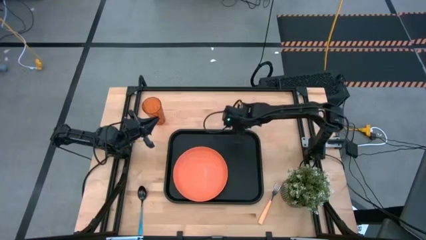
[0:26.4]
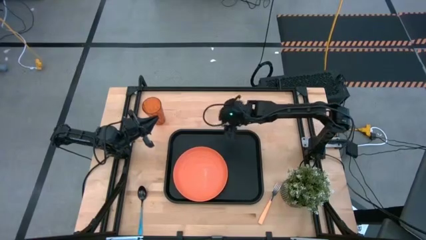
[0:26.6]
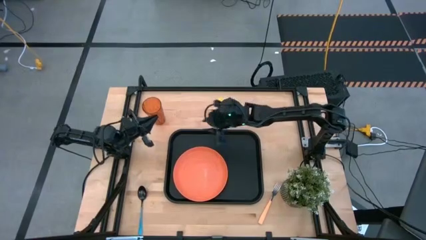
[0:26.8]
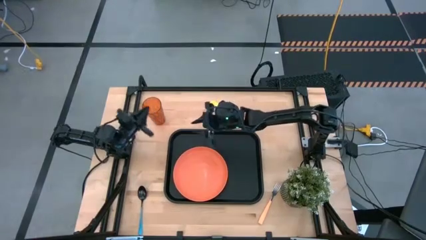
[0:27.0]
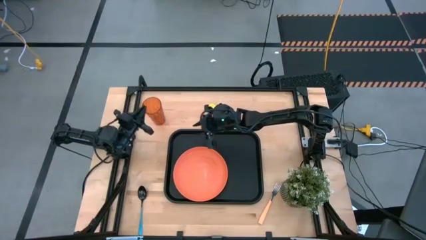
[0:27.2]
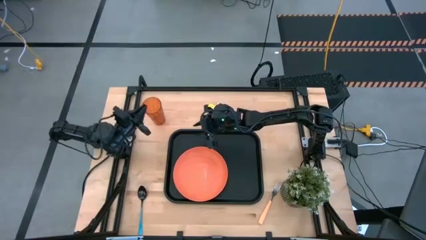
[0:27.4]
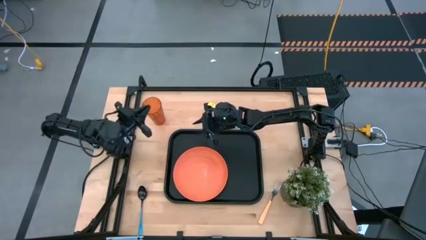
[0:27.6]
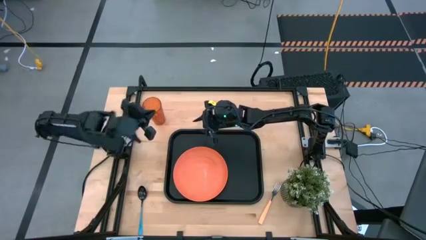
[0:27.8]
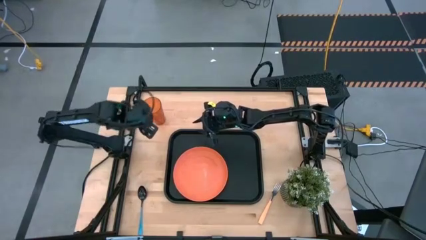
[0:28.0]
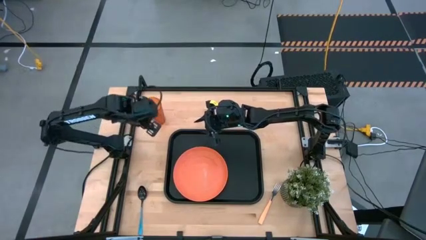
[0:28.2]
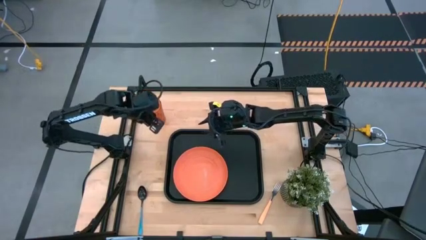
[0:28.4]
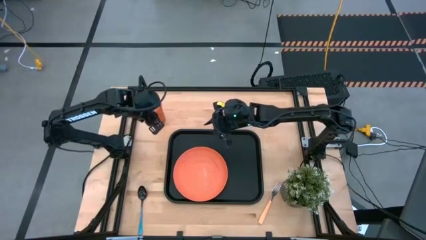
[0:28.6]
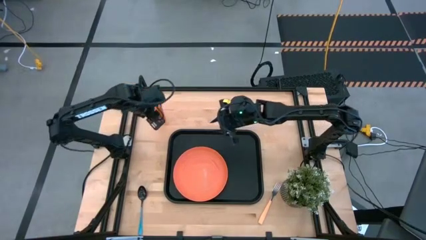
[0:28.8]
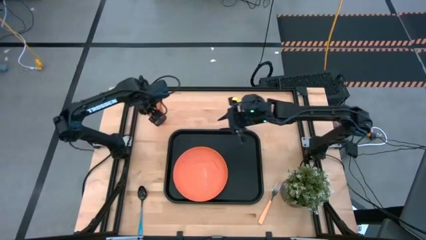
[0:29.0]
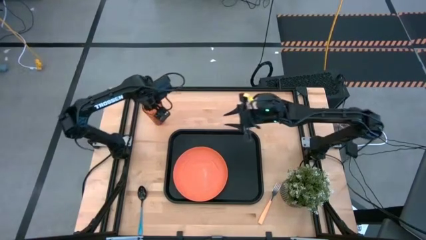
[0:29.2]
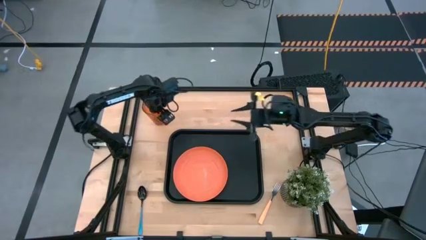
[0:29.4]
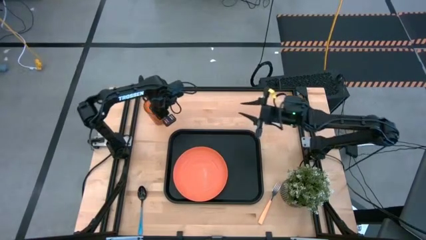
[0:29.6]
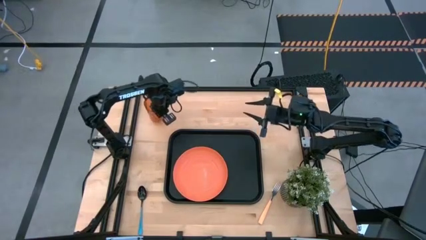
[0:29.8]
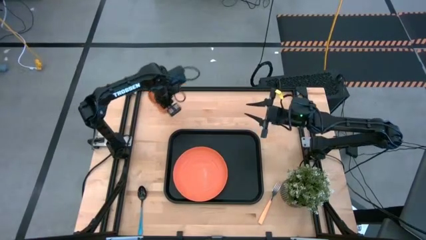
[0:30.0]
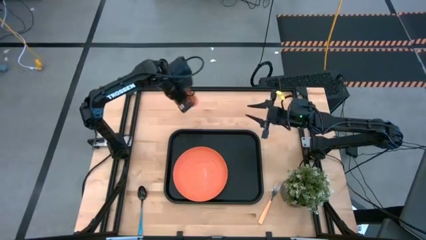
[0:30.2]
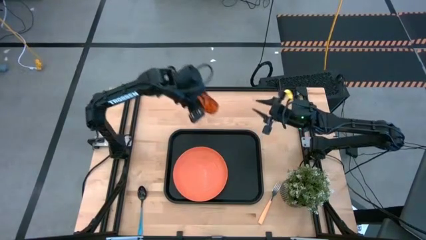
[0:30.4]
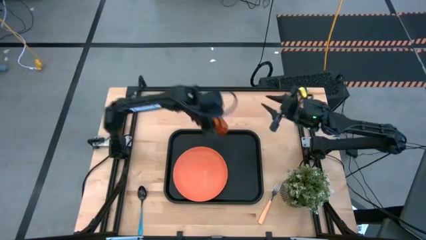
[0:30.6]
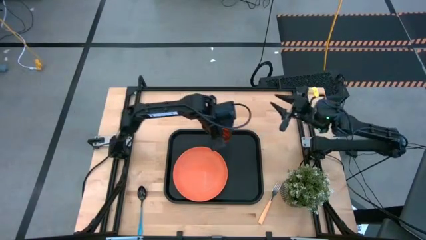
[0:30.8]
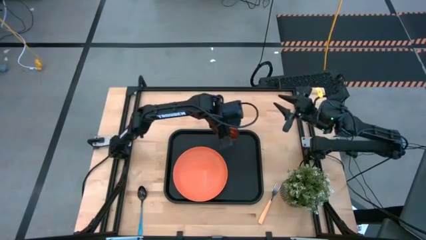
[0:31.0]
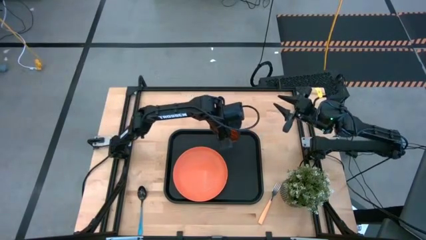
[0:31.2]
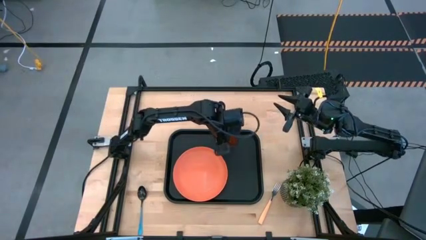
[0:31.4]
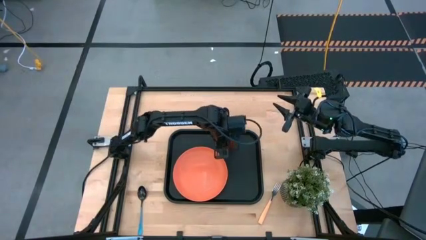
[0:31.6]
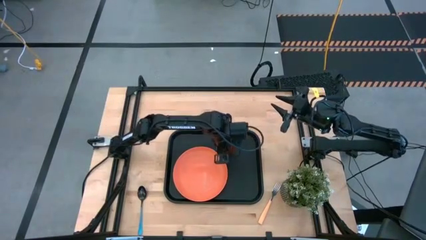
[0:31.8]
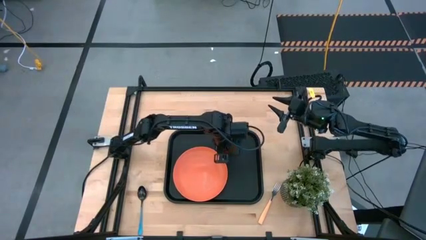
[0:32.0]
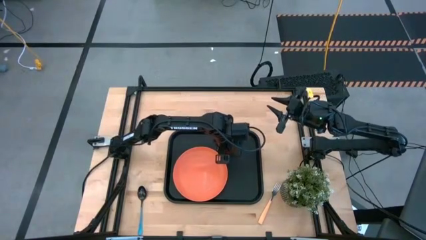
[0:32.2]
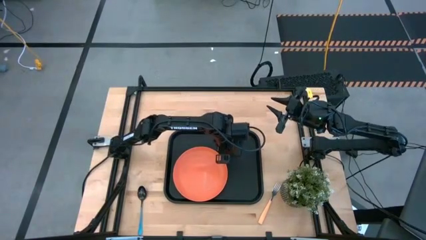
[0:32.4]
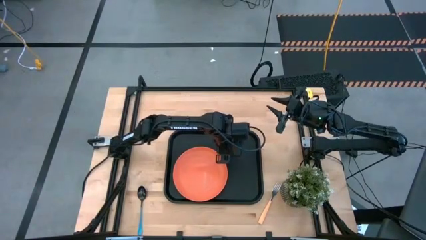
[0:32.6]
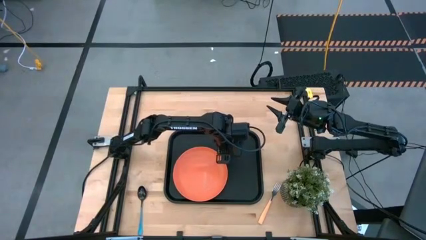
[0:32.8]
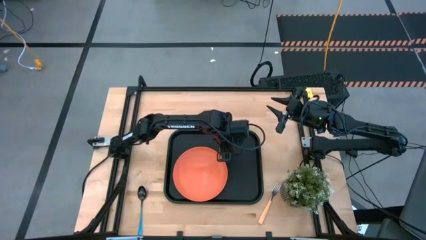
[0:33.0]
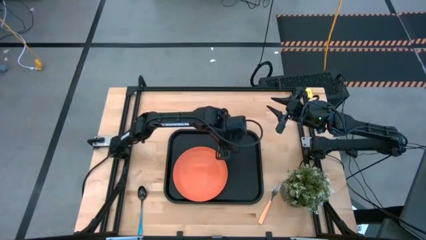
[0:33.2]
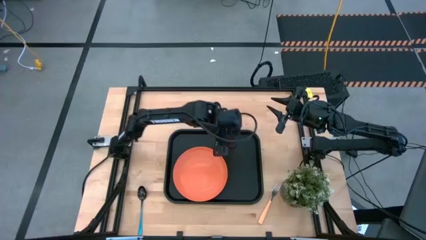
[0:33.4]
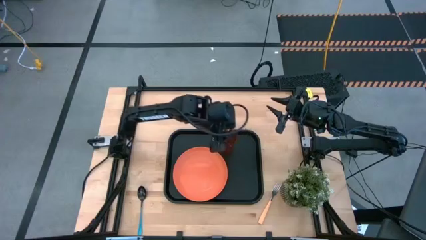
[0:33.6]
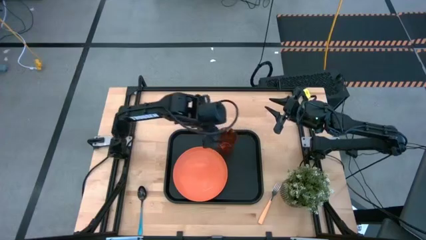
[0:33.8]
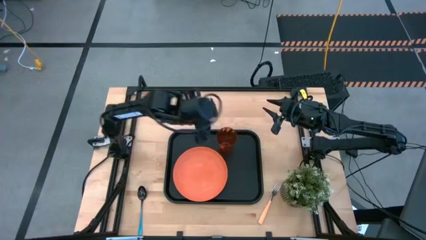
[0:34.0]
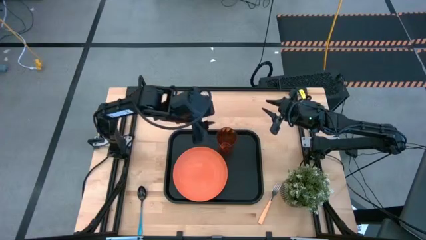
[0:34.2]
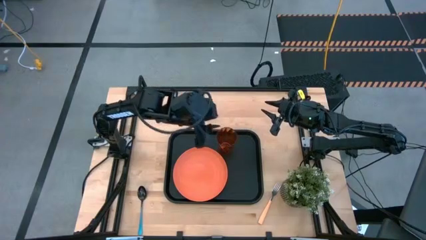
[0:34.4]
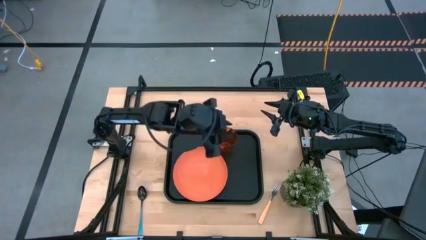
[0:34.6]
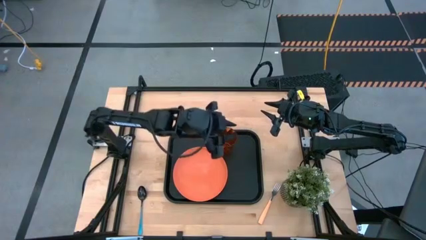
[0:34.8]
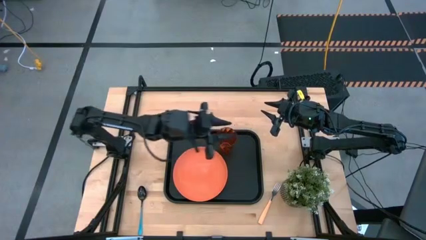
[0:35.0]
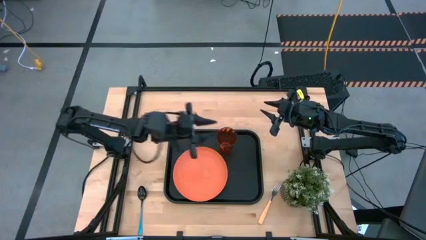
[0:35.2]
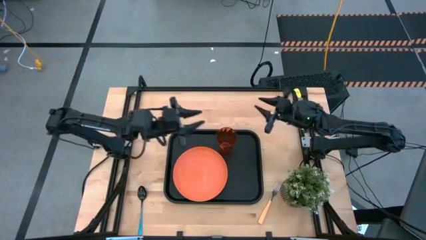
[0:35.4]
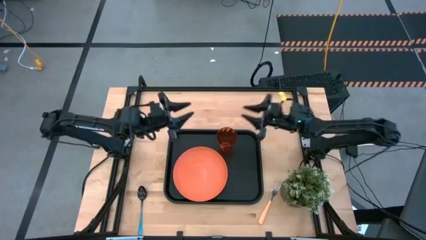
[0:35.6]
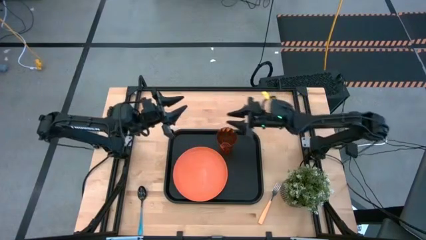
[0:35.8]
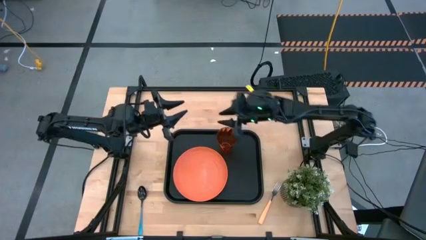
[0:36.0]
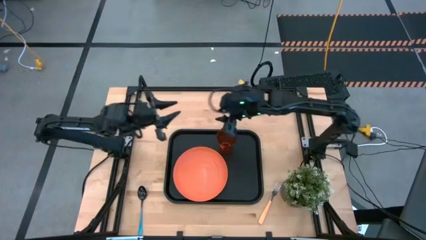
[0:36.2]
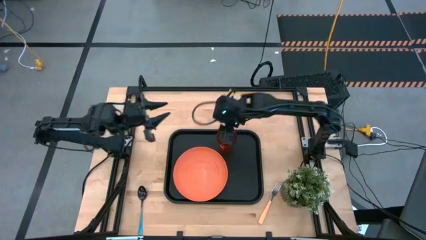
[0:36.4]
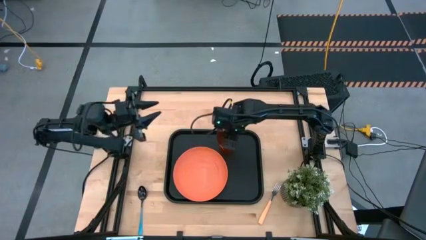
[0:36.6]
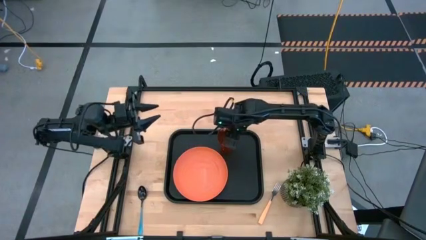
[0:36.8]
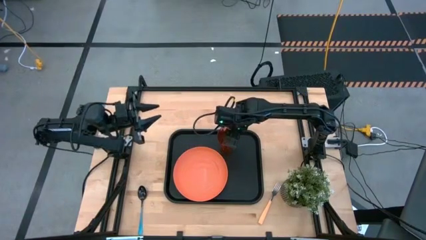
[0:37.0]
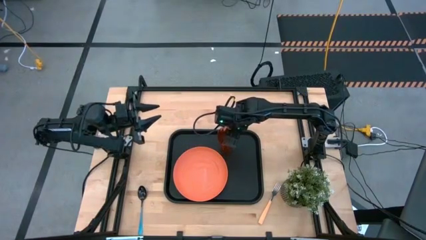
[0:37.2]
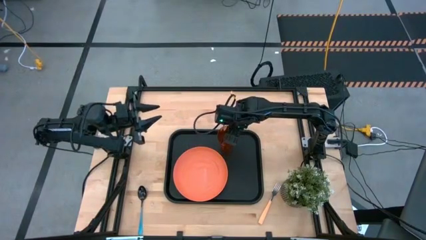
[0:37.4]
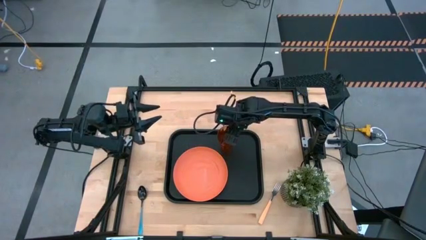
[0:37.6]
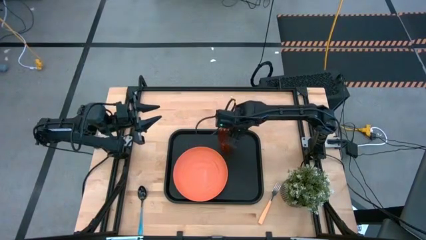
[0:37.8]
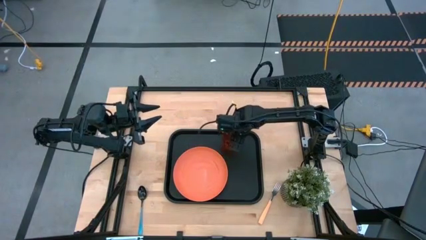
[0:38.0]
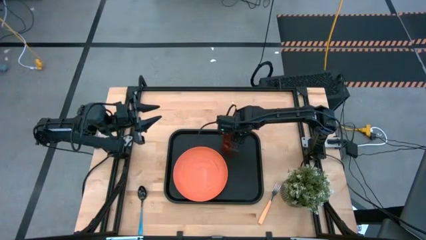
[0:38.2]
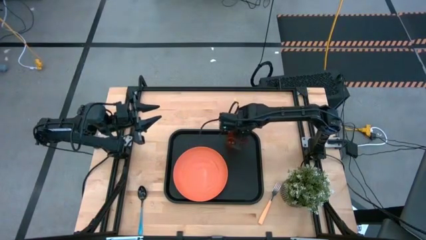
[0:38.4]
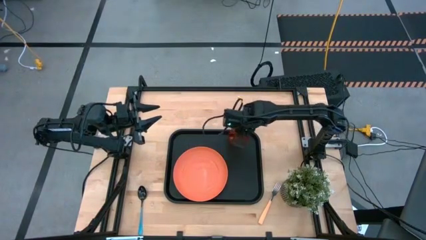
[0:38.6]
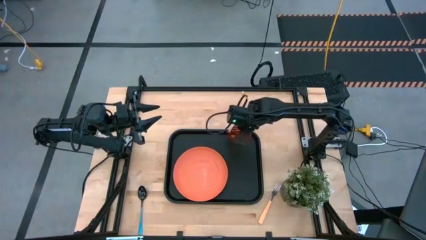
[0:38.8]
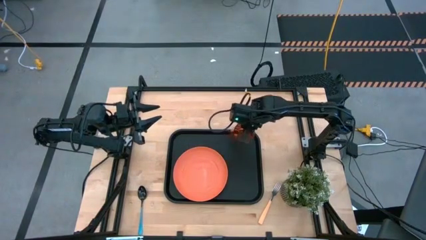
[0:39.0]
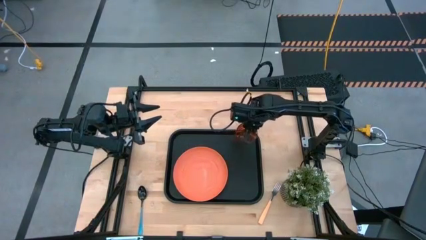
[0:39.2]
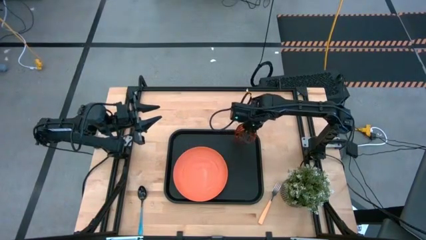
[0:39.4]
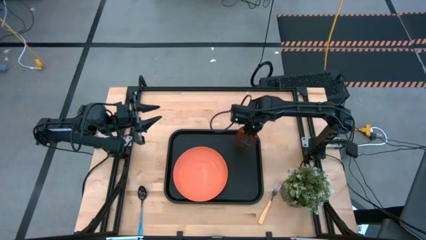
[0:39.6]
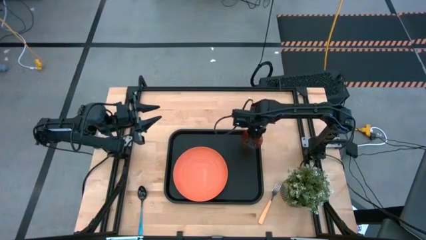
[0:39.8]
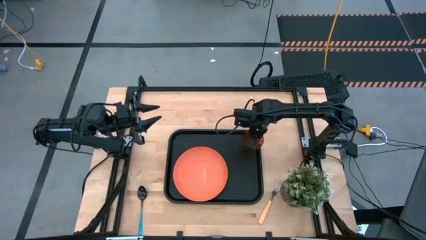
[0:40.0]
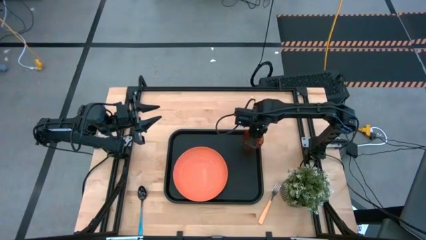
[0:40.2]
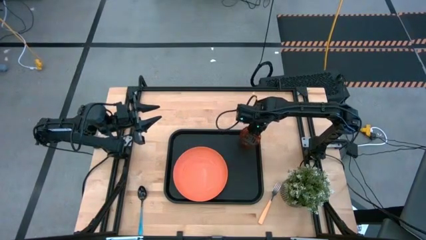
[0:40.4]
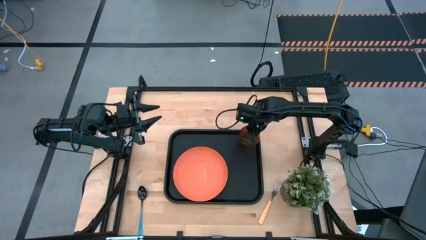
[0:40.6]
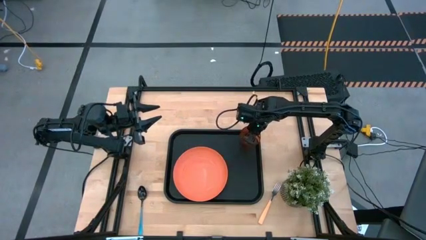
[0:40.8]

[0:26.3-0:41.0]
Task: Pick and place plate/cup/fork/spoon on tray
Put the orange glass on the black serving tray
